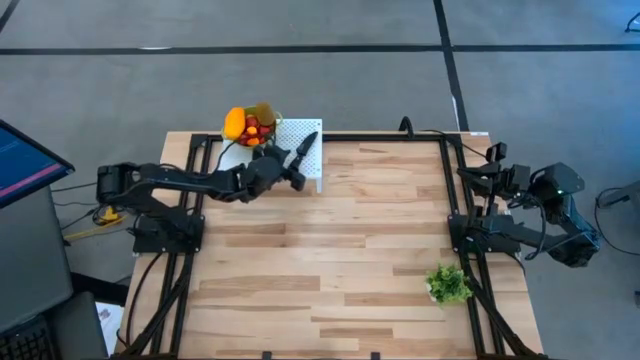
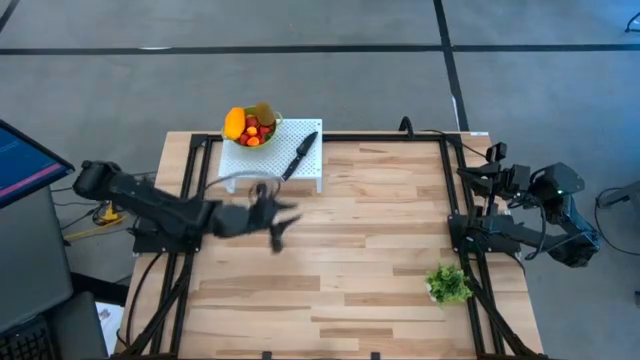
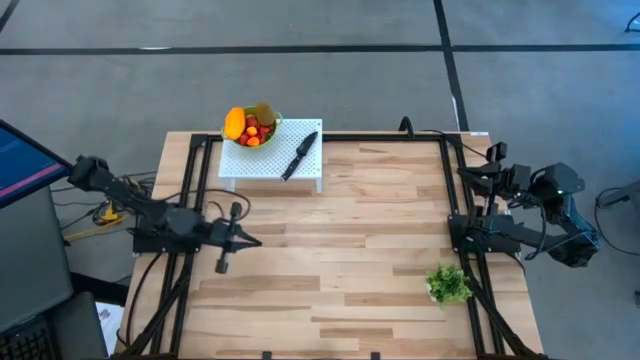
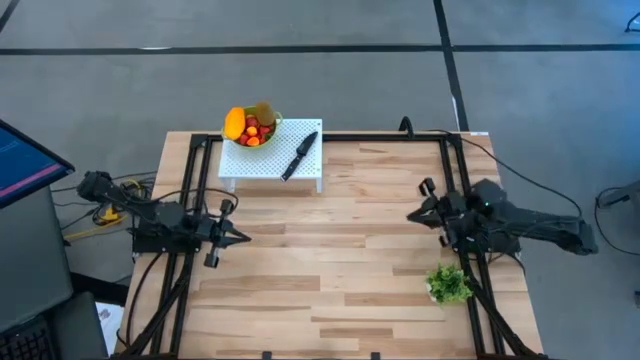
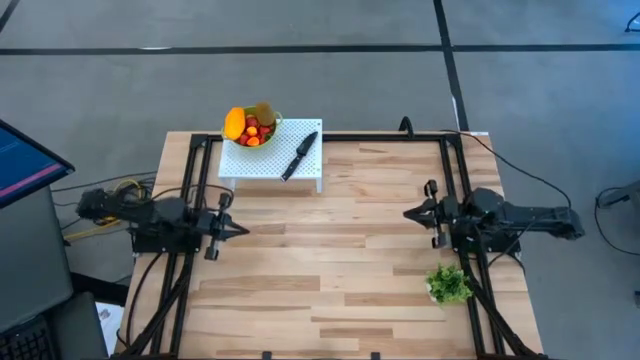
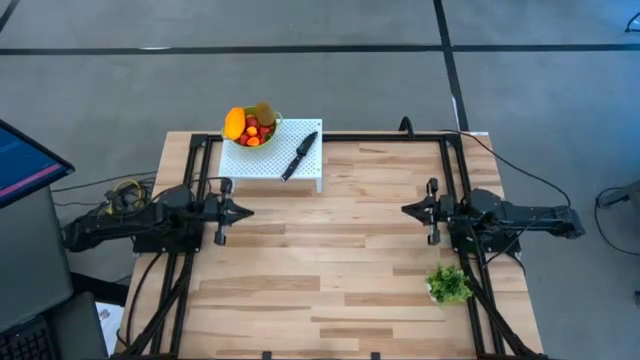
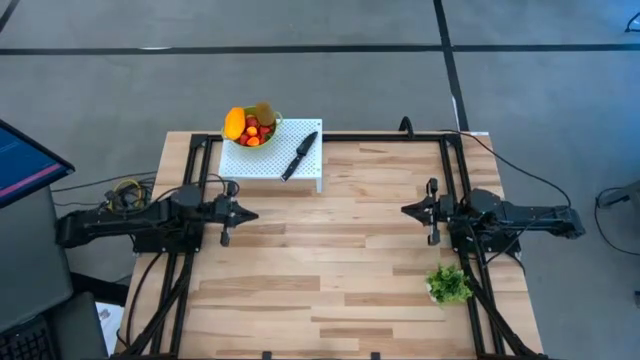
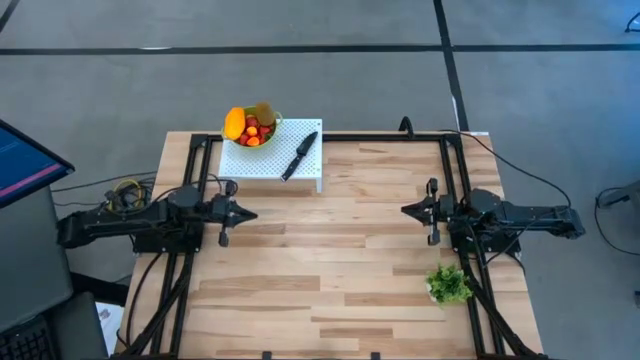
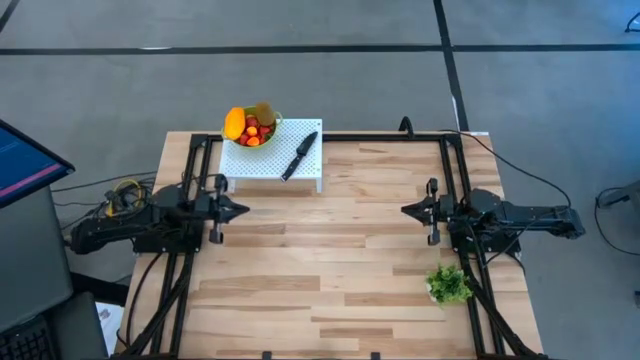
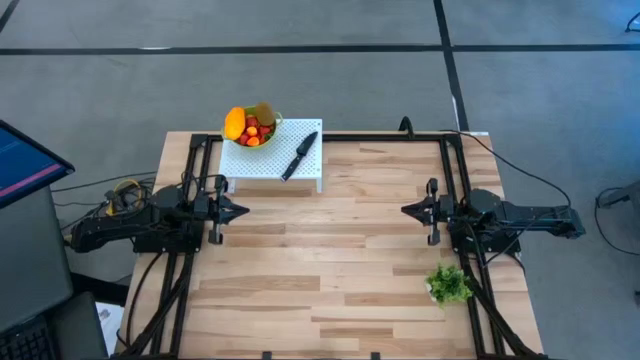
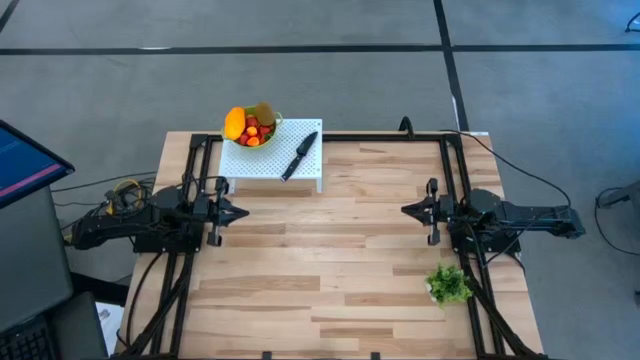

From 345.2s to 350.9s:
Task: Pick & Place Fruit
Return to Home Position

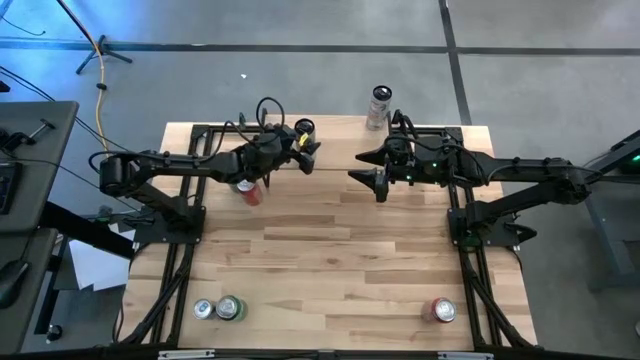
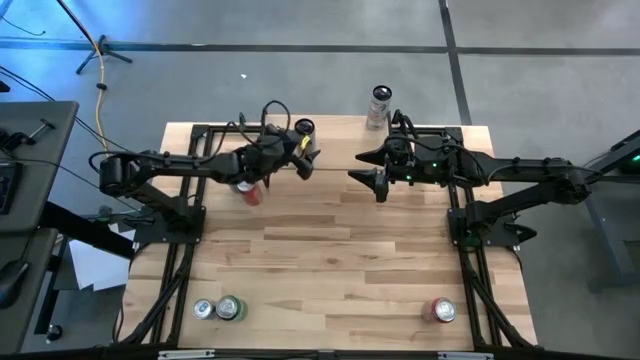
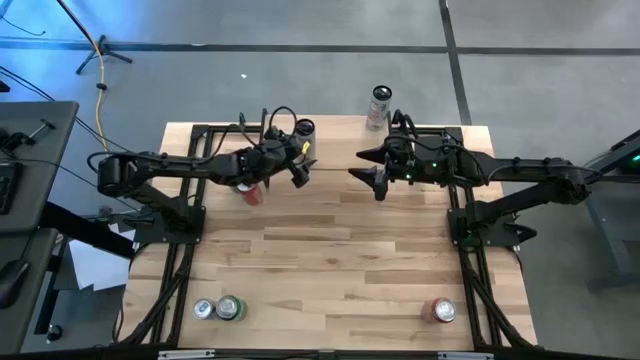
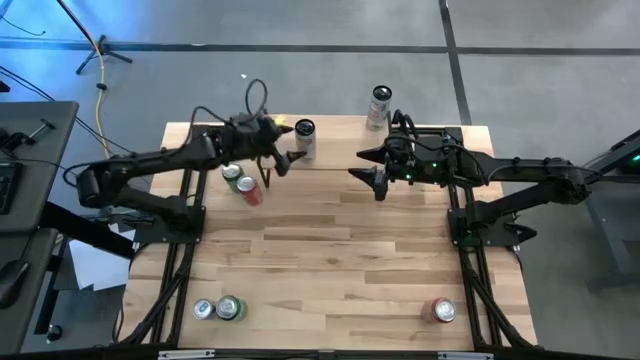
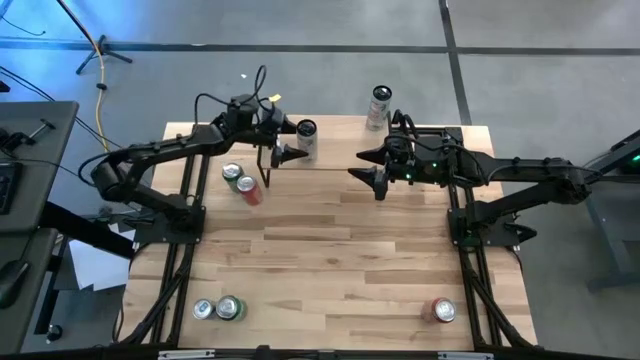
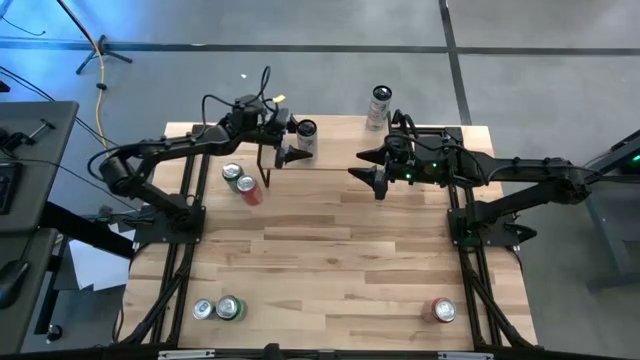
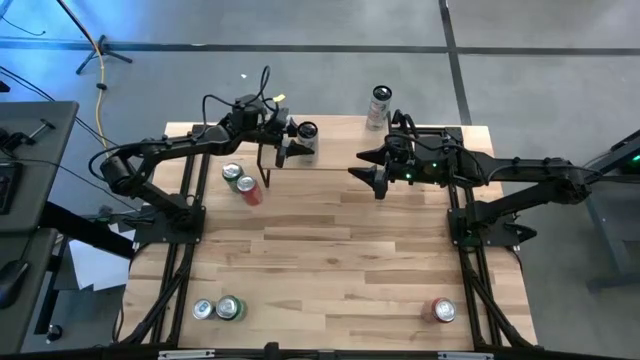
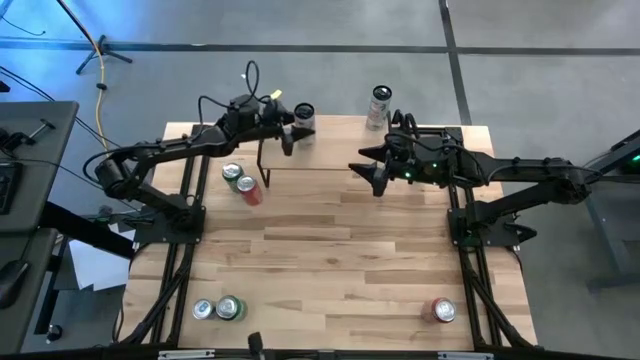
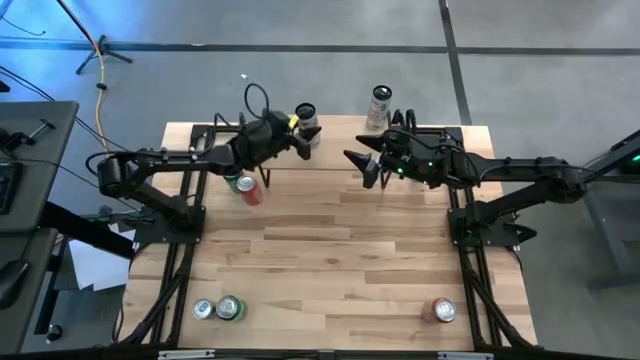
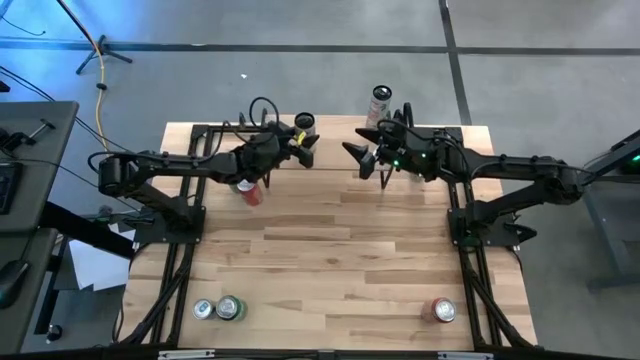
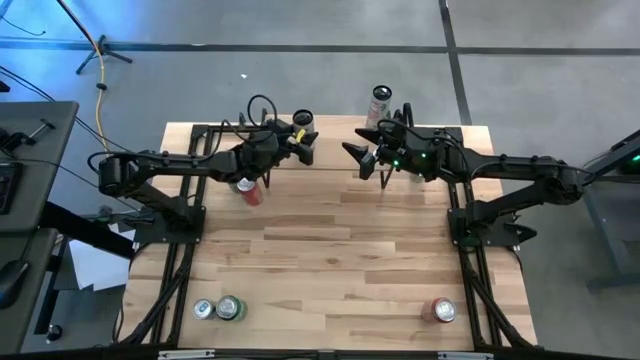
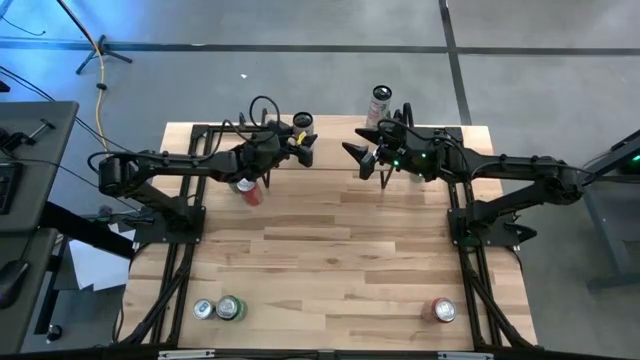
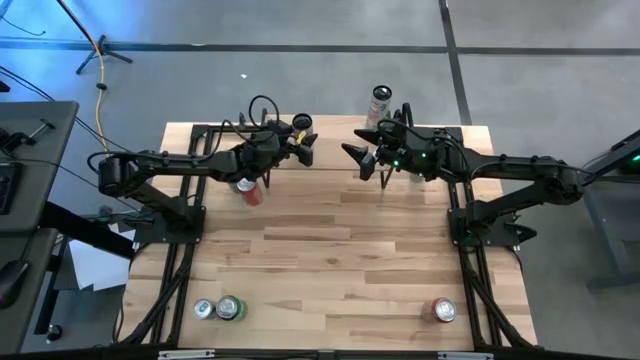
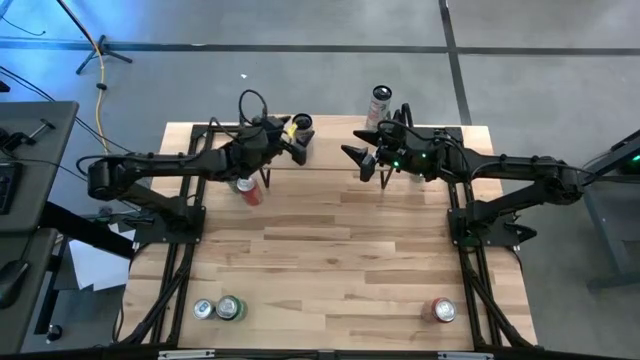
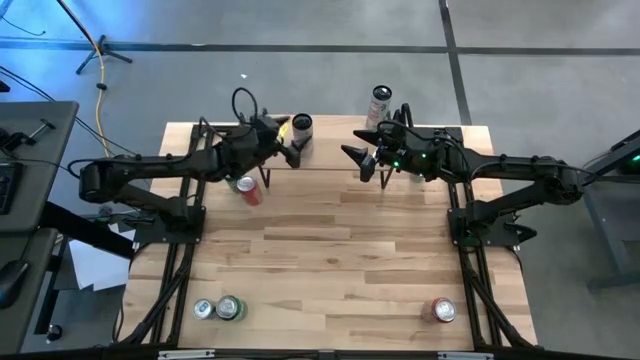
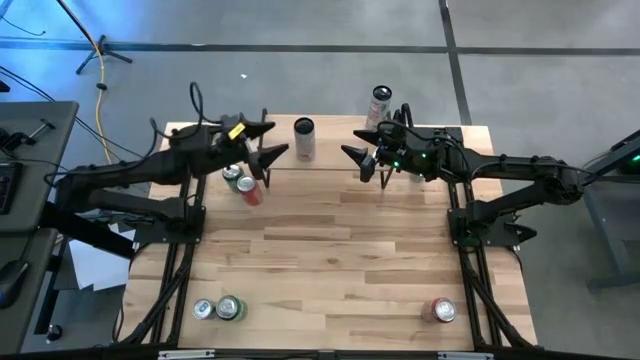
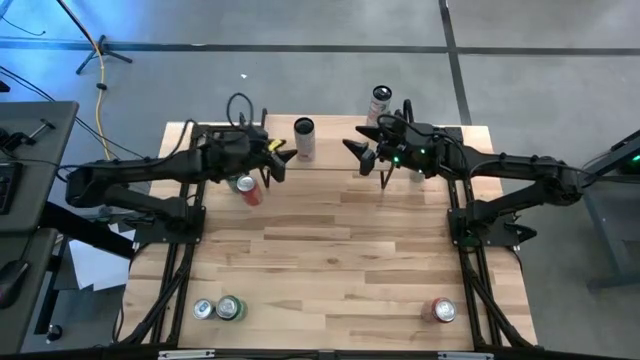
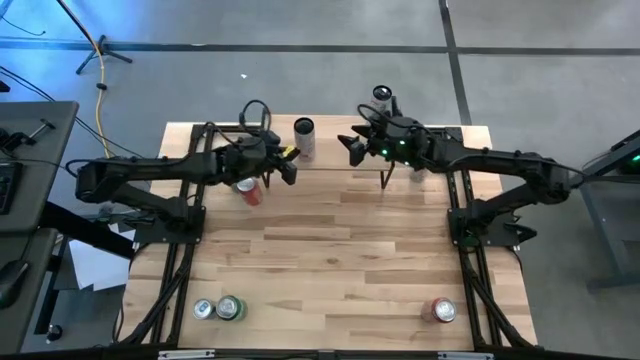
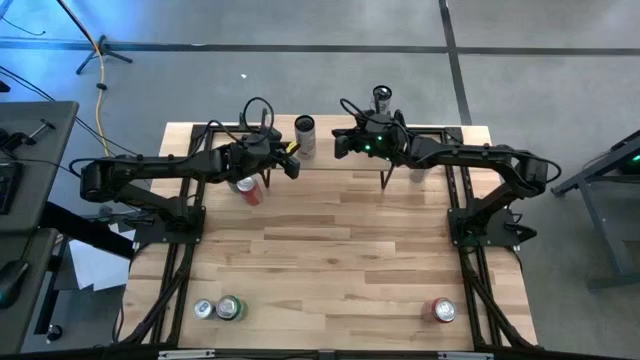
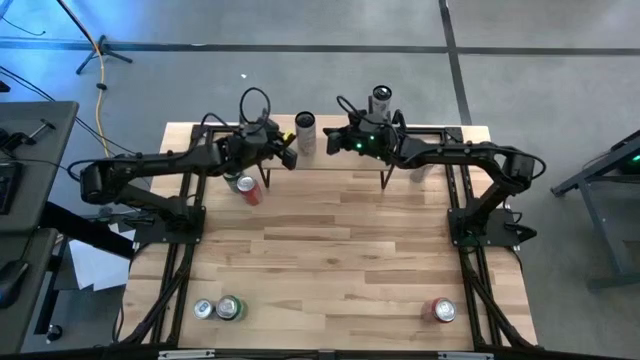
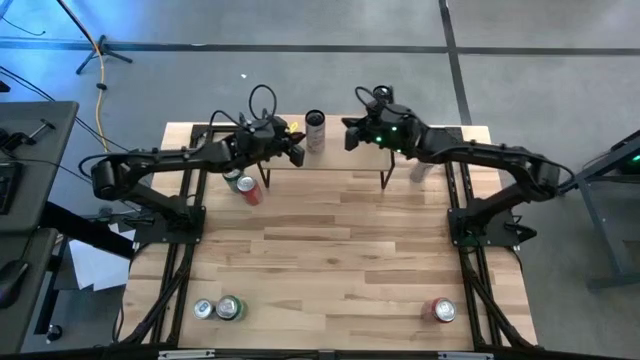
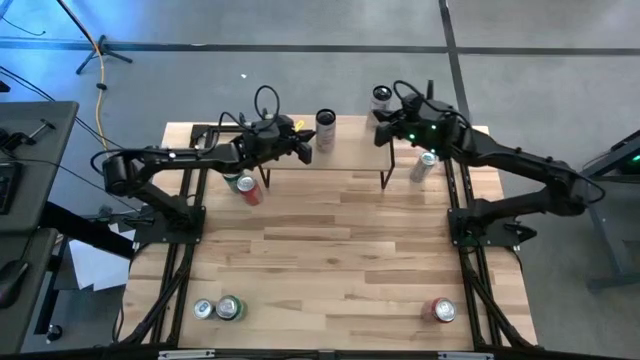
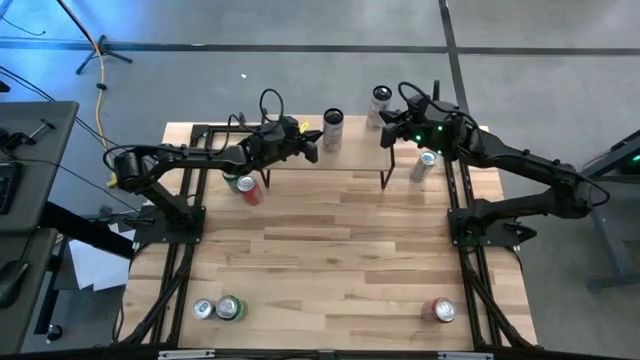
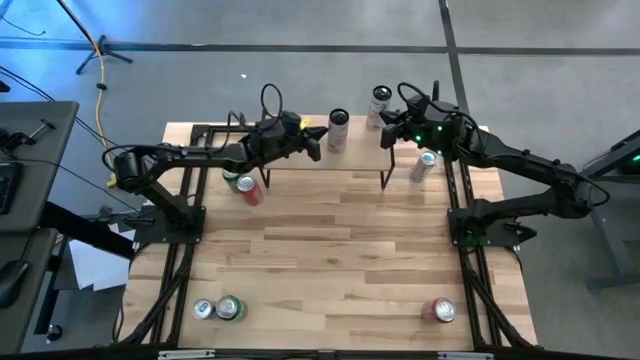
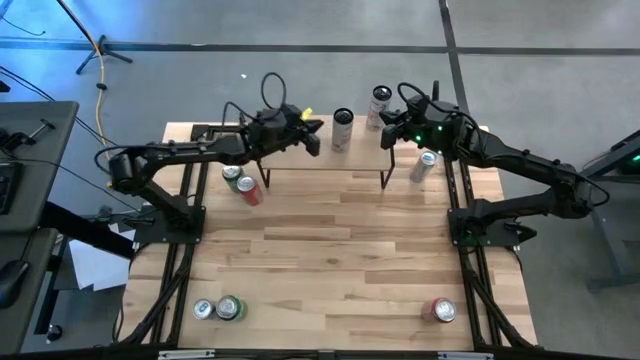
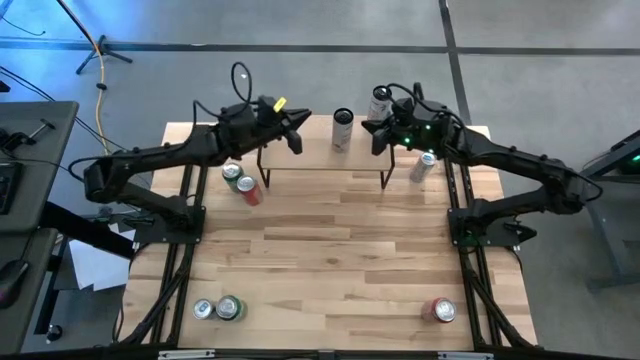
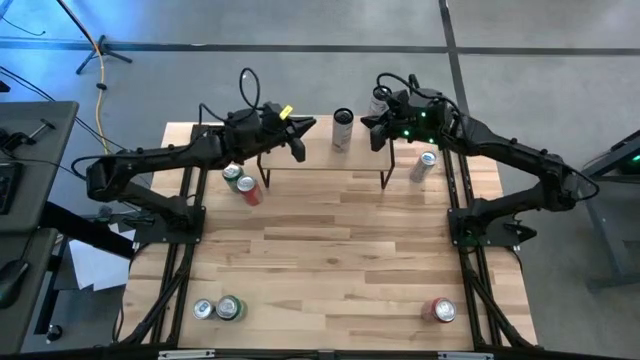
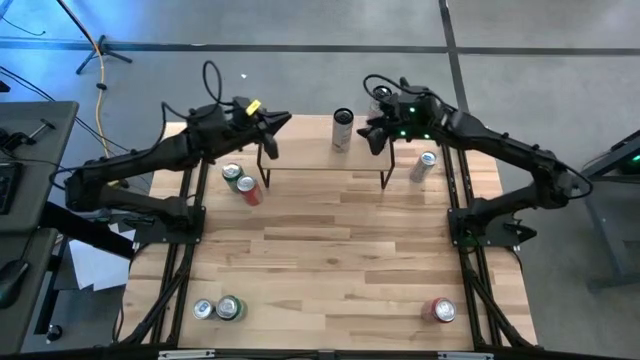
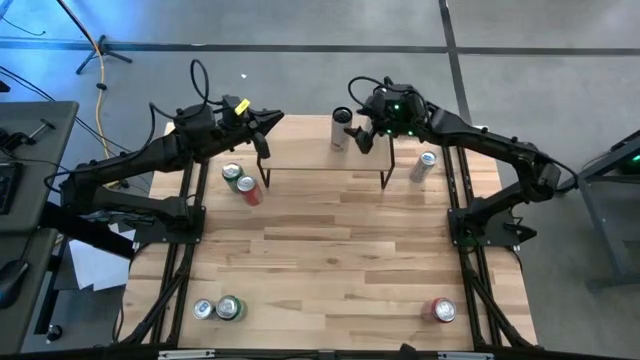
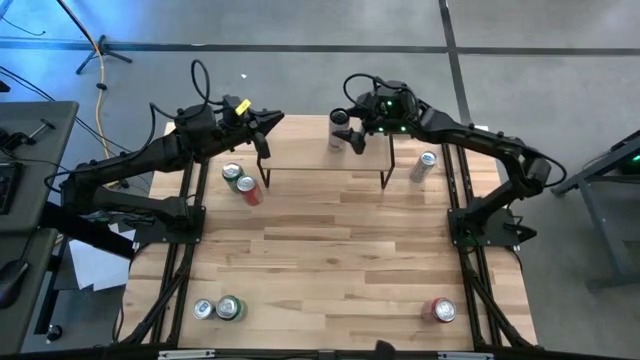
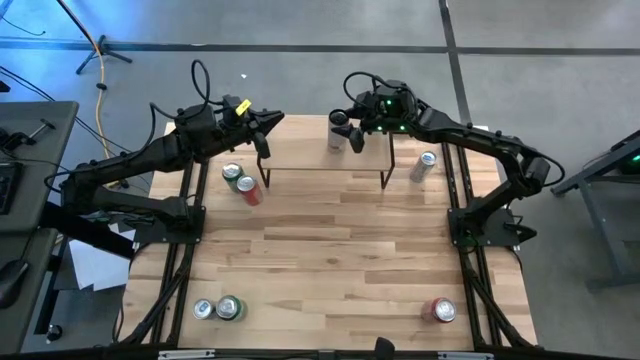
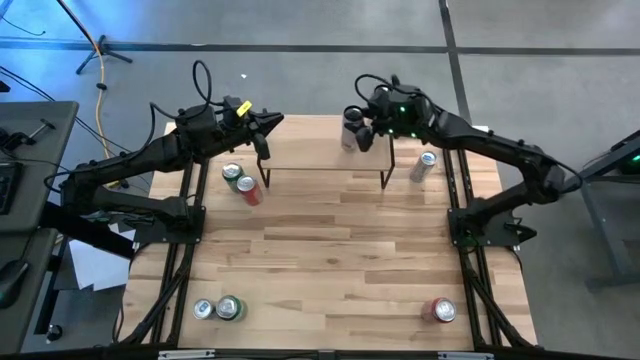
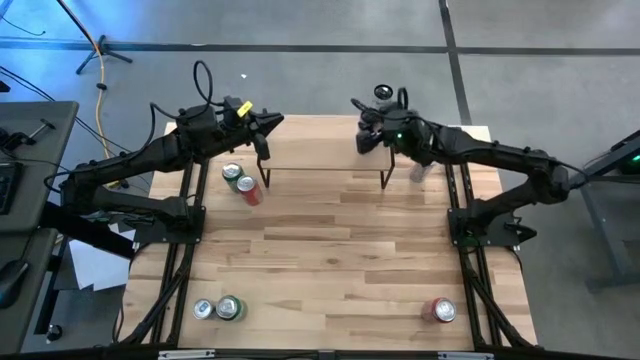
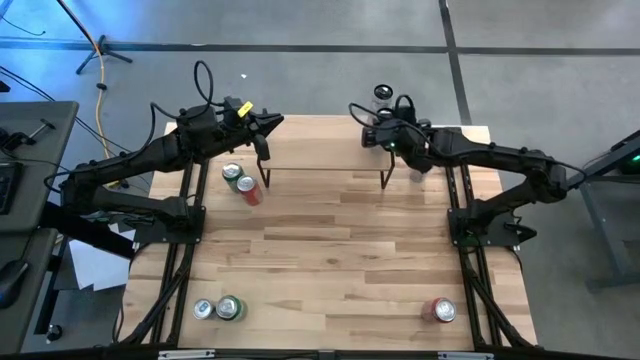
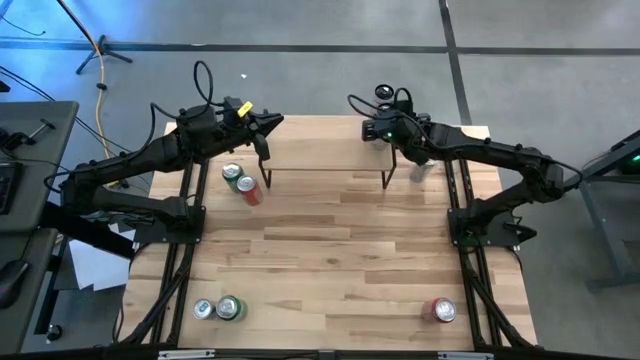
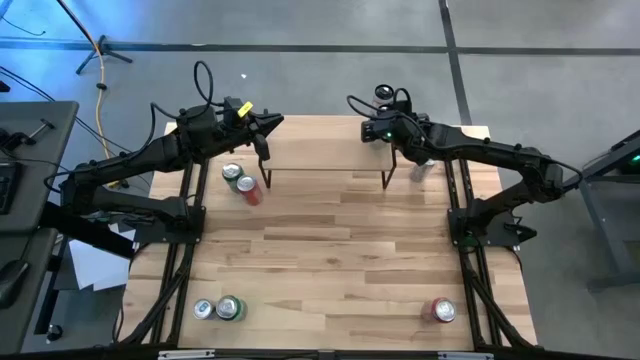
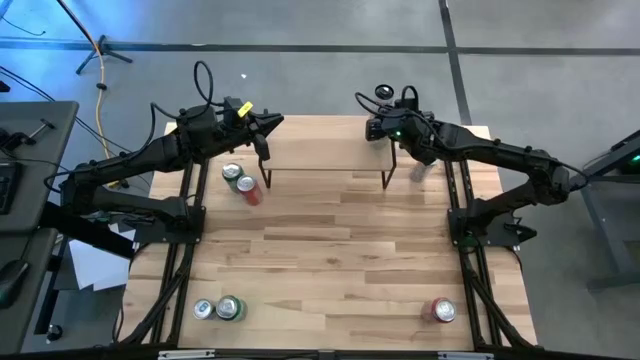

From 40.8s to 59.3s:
Task: Place canned beverage on shelf
Put the white pink soda can on the shelf aligned with the other white pink soda can
